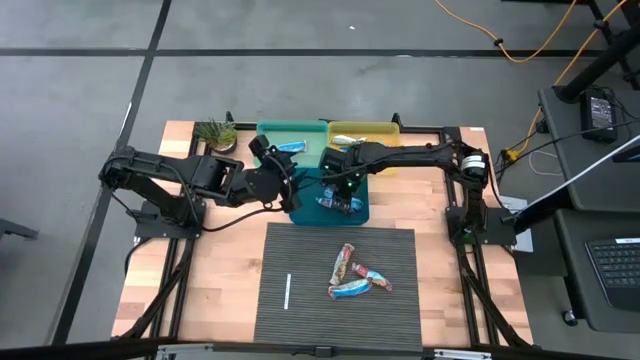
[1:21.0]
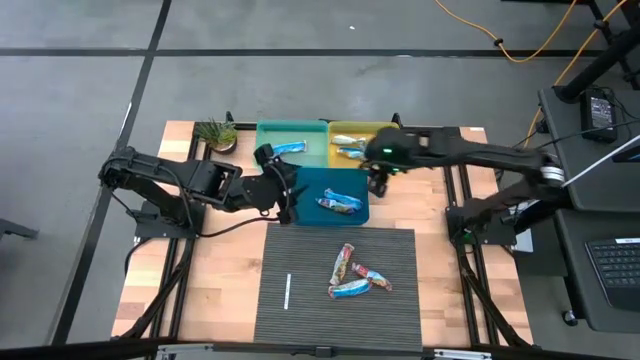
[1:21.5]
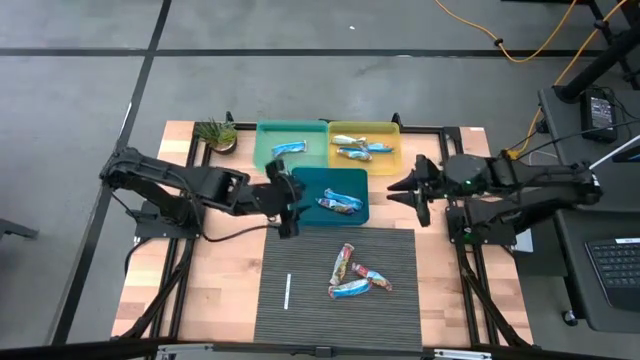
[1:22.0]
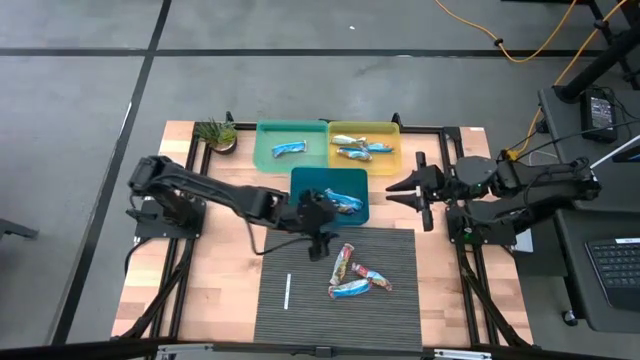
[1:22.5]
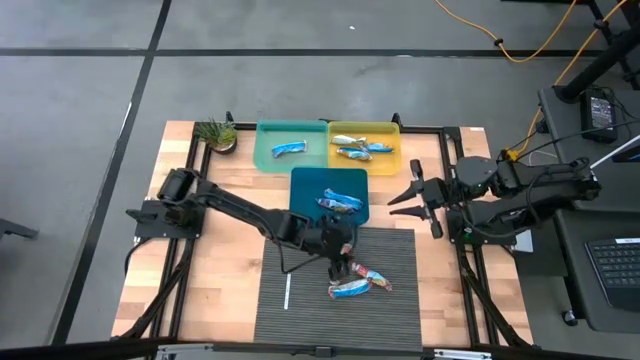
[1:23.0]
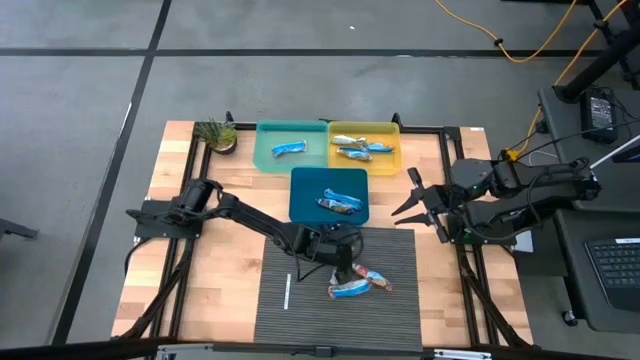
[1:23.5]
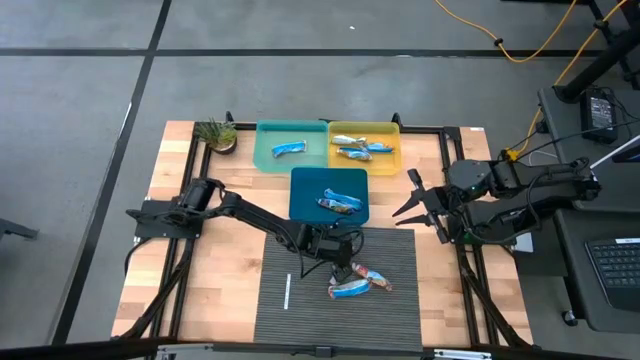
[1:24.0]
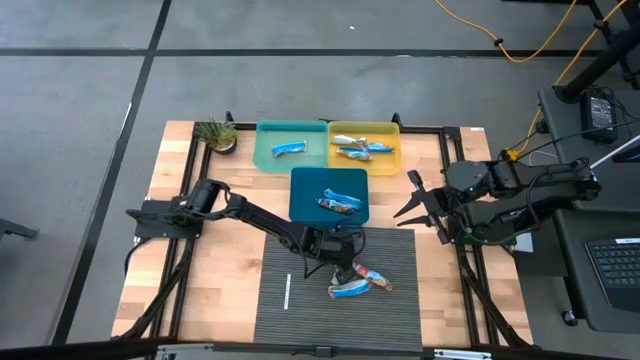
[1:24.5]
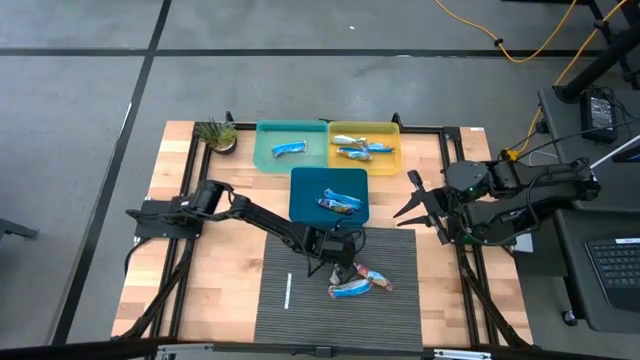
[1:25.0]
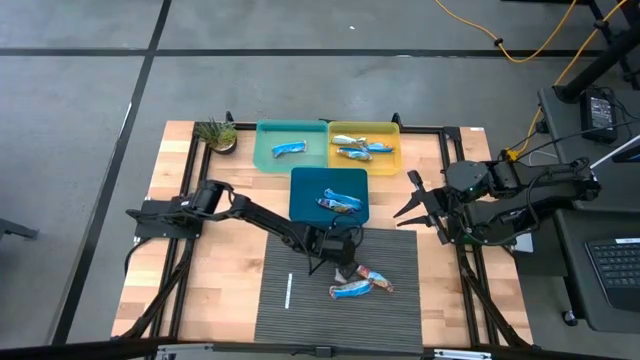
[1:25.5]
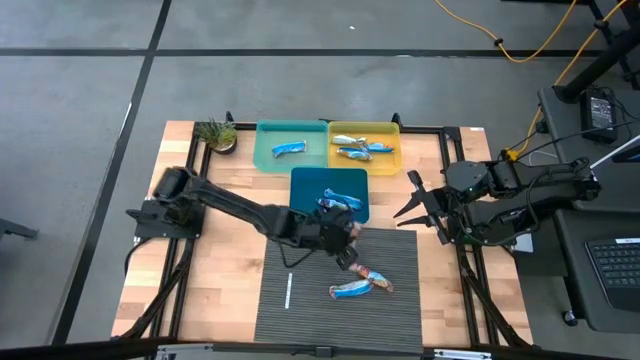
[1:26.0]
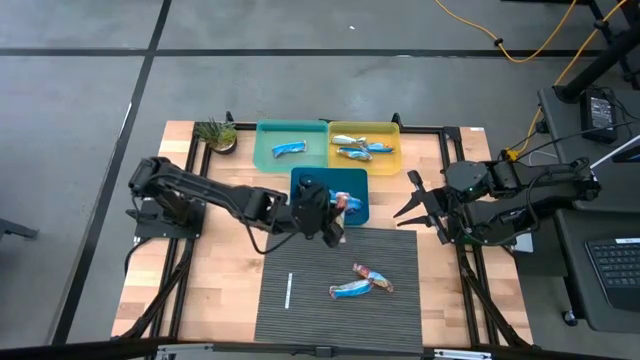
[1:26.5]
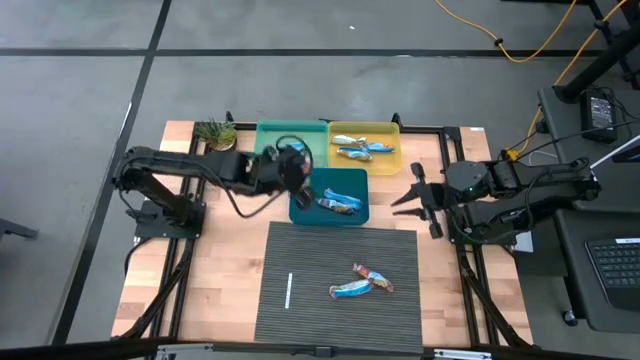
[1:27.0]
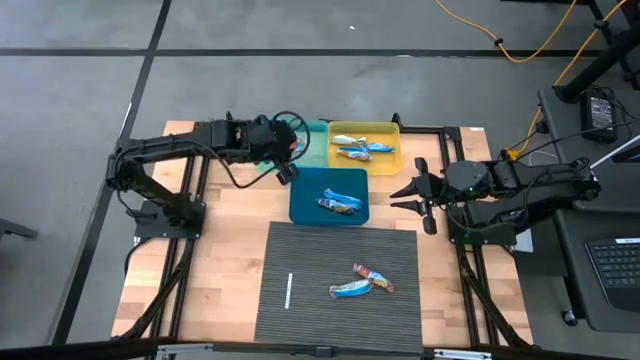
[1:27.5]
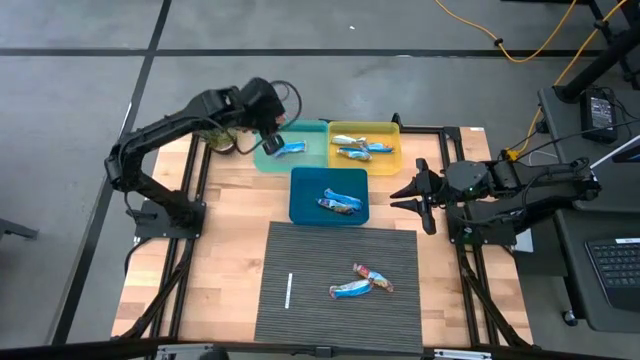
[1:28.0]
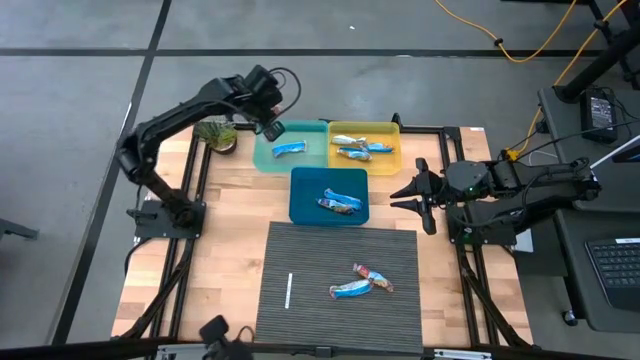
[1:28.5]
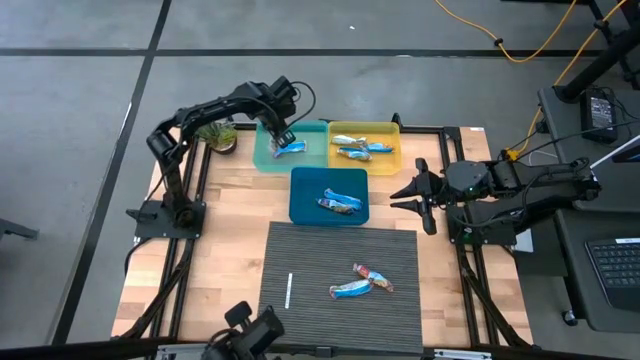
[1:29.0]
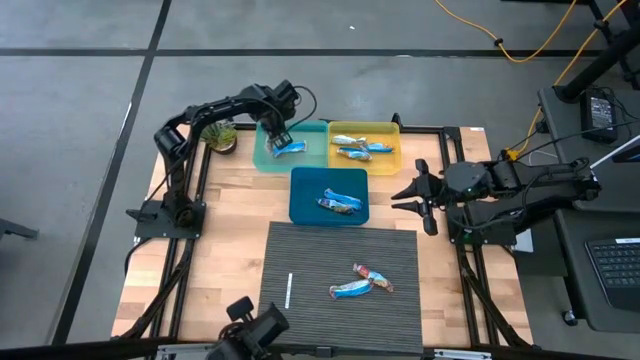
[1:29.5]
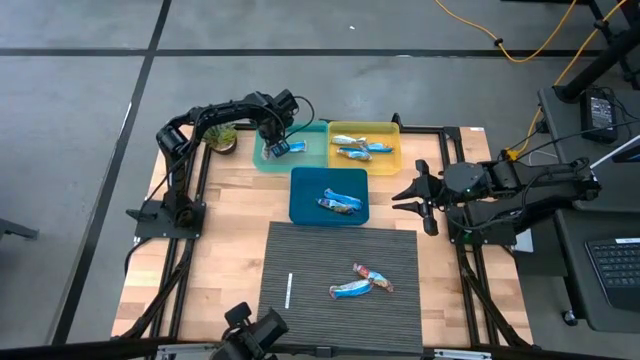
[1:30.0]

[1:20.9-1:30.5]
Task: Pick and place Granola Bars by type
Put the red granola bar into the green bin

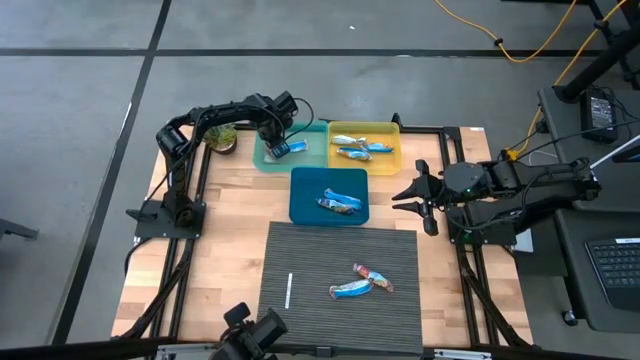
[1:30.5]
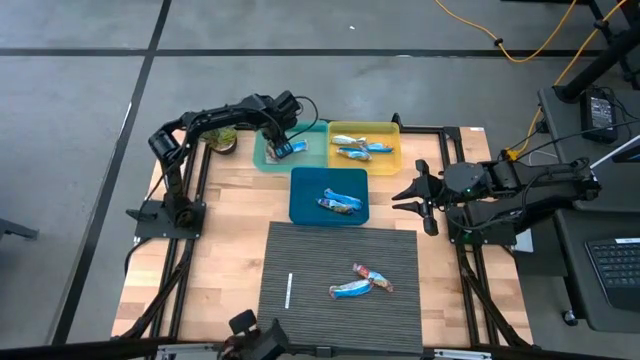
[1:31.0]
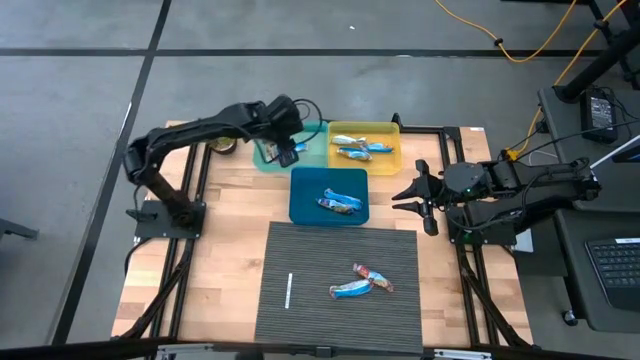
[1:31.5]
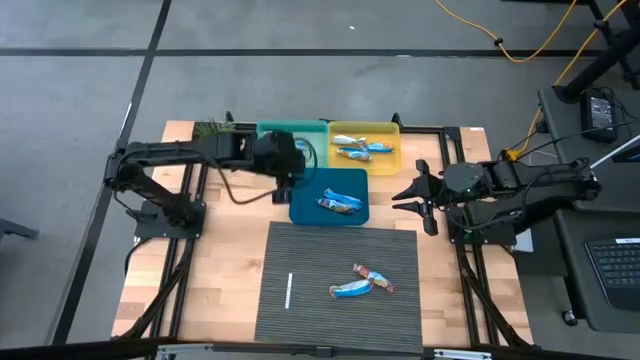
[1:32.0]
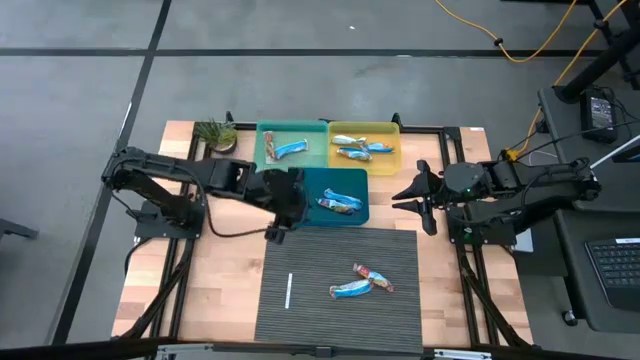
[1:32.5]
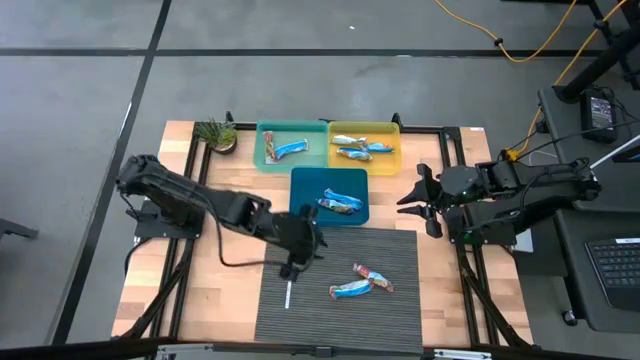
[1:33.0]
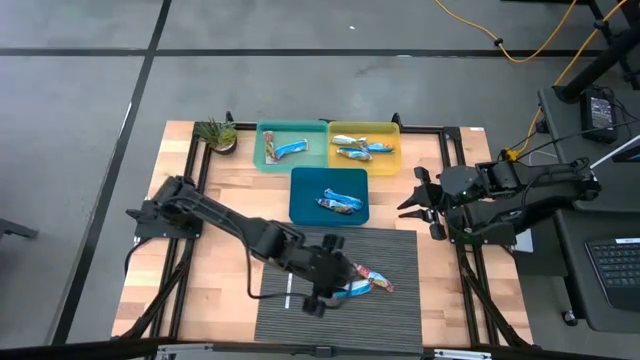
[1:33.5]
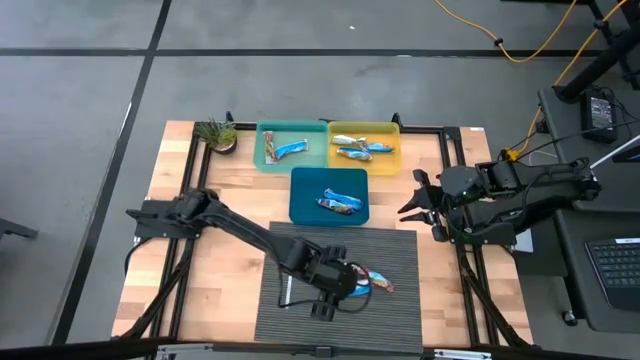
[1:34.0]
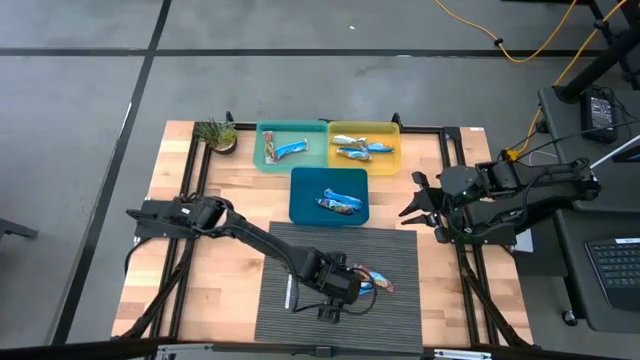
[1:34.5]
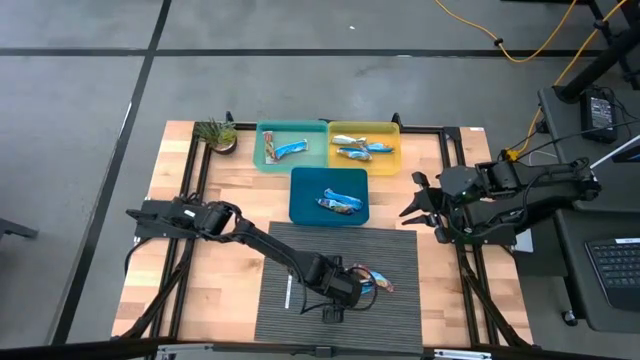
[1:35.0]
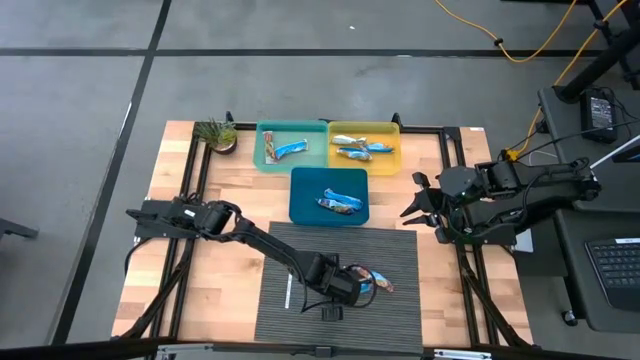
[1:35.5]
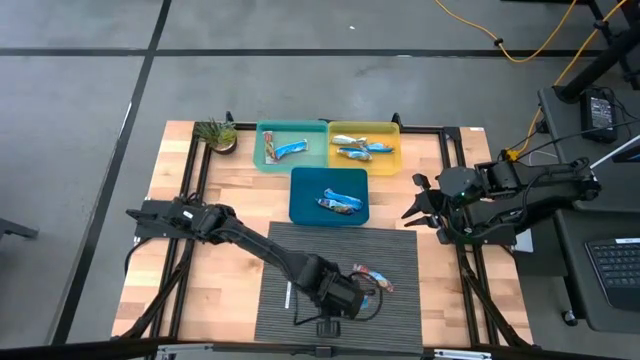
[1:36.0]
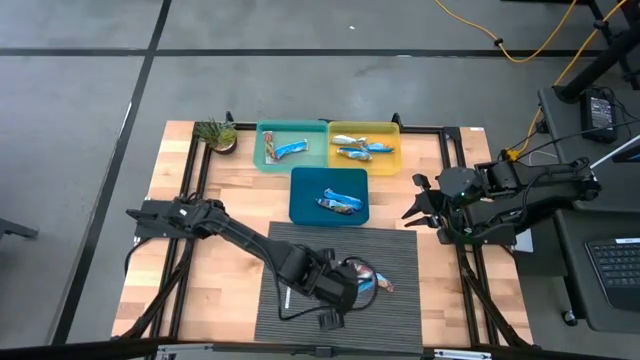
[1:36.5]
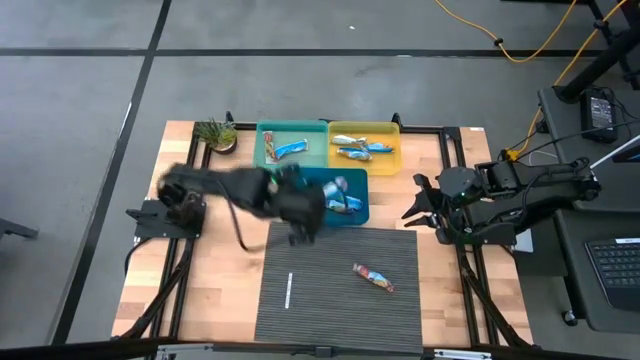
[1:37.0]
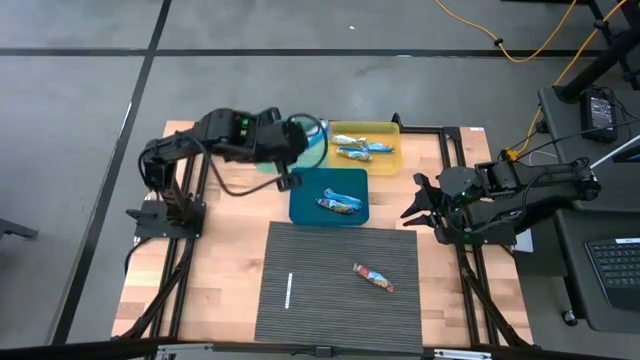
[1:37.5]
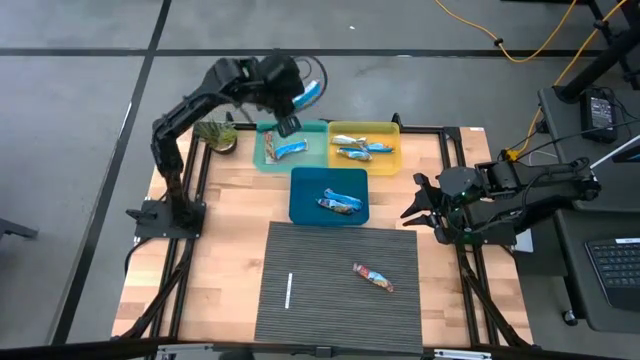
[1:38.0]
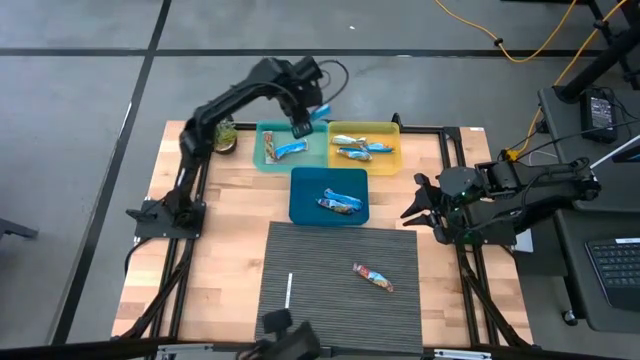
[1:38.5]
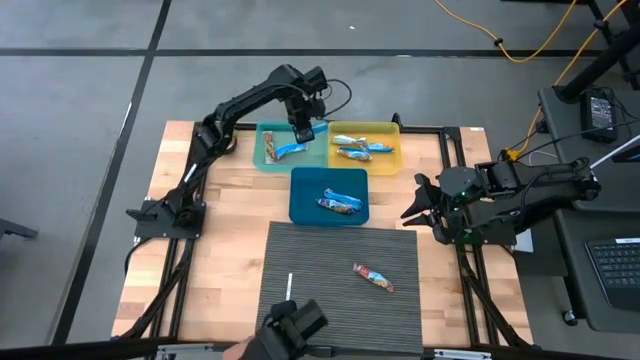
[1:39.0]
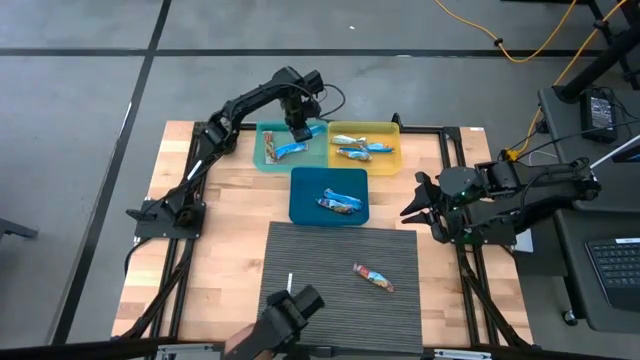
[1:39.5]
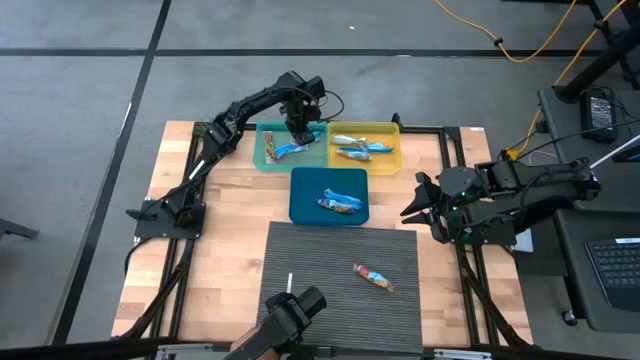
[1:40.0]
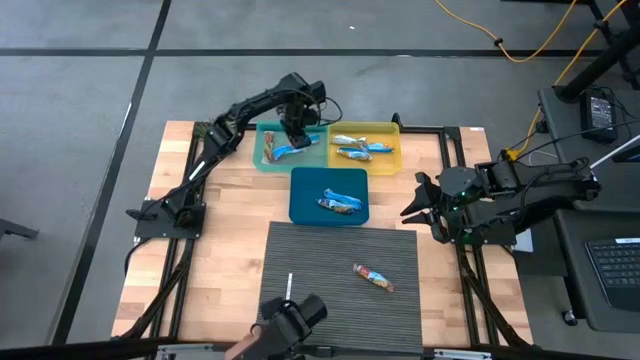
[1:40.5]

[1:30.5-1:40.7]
Put the red granola bar into the green bin

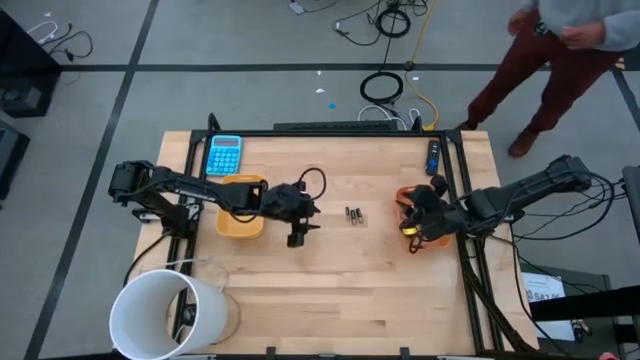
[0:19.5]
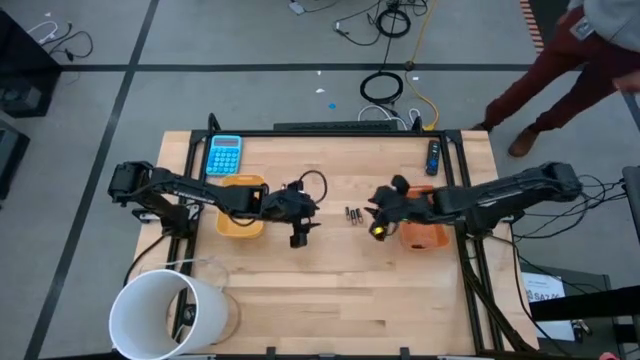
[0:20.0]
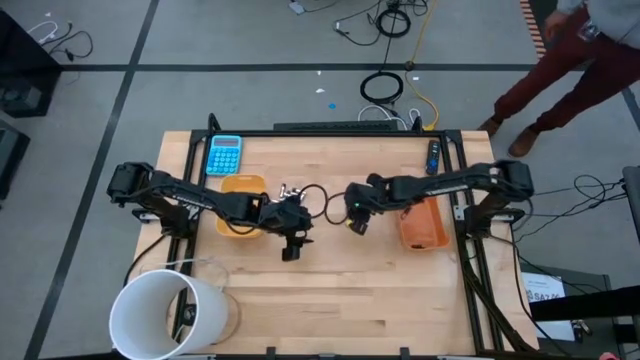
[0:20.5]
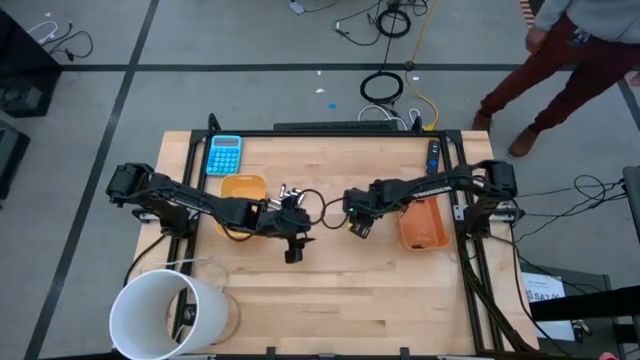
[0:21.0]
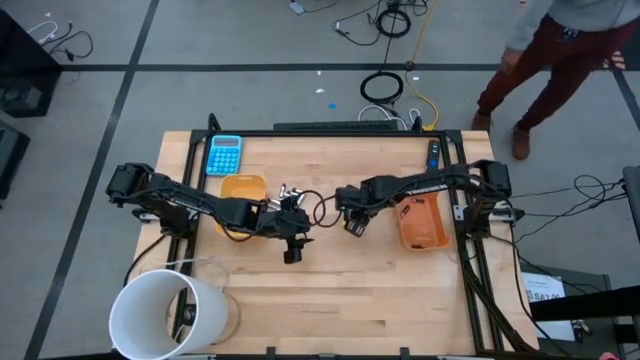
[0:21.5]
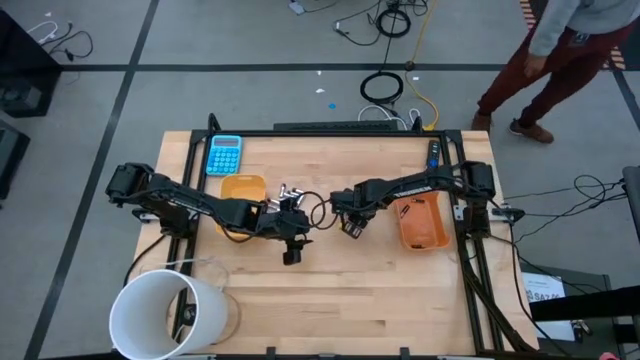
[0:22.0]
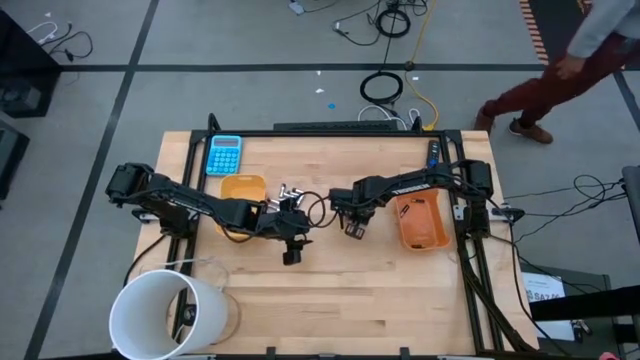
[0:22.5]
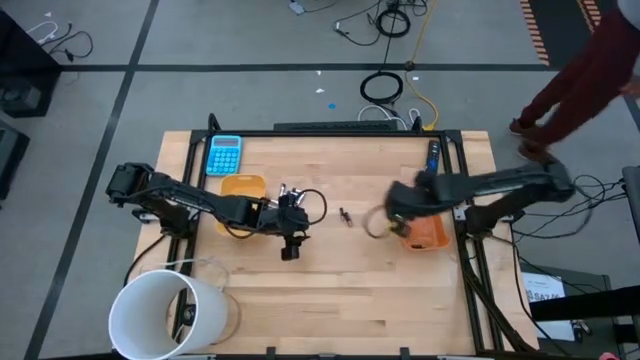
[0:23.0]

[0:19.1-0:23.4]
Task: Sort batteries
Put the black battery into the orange bin
